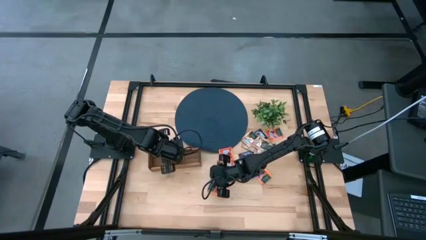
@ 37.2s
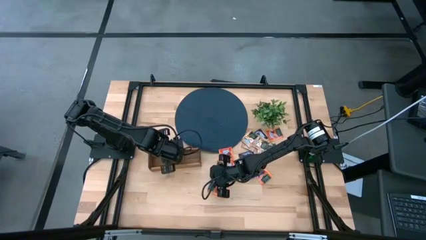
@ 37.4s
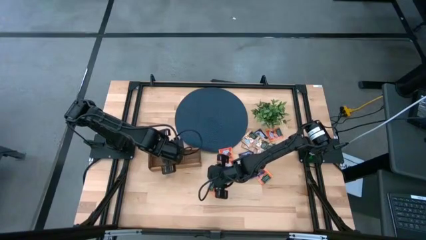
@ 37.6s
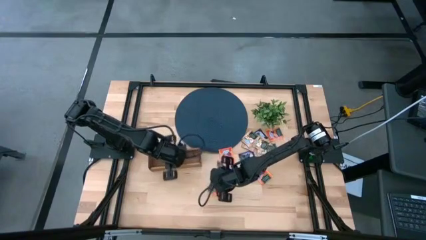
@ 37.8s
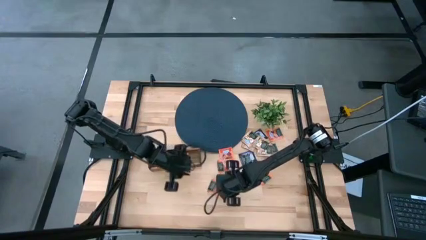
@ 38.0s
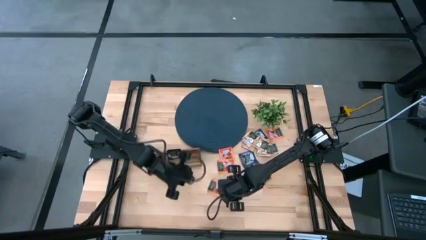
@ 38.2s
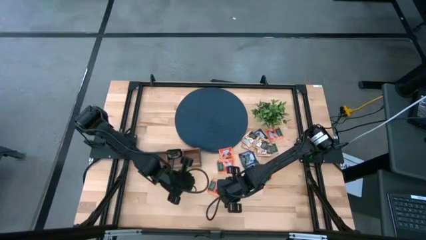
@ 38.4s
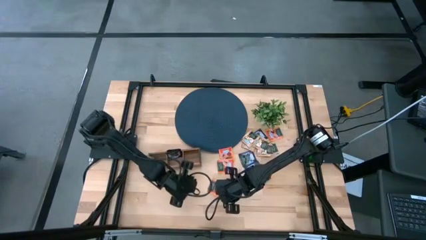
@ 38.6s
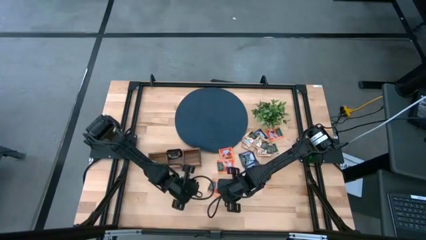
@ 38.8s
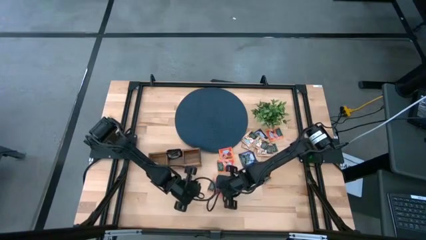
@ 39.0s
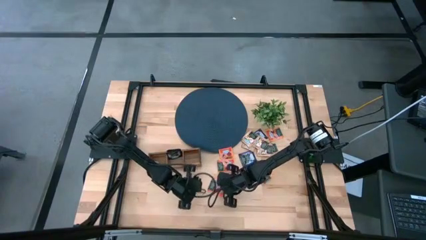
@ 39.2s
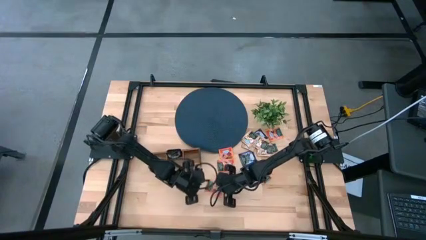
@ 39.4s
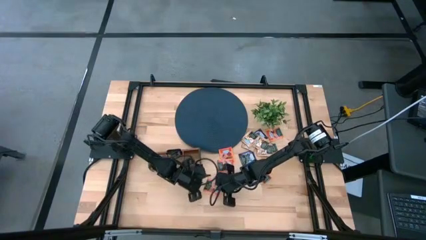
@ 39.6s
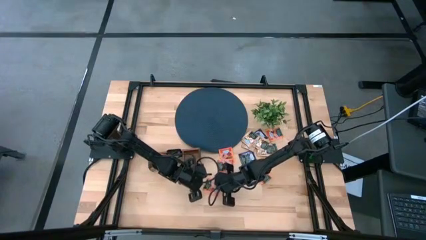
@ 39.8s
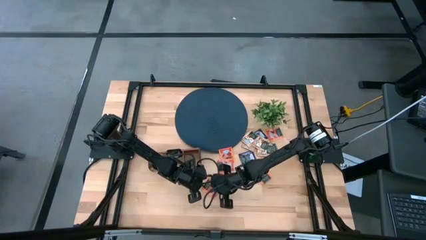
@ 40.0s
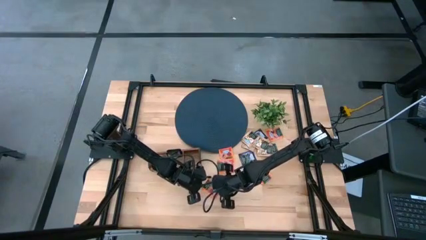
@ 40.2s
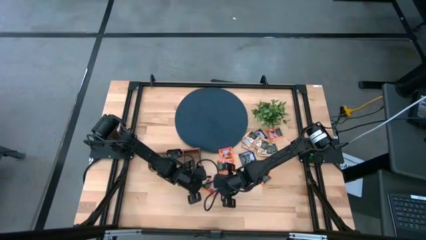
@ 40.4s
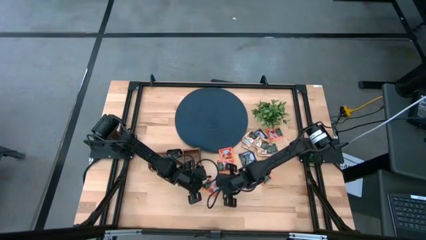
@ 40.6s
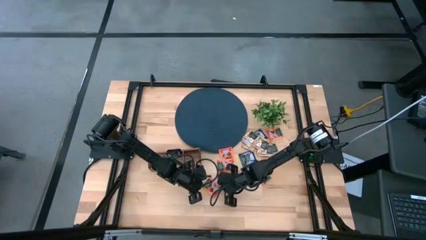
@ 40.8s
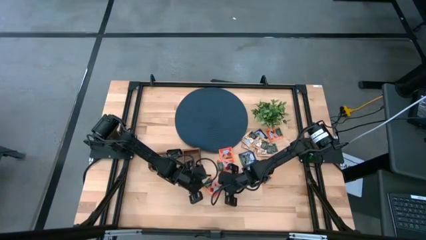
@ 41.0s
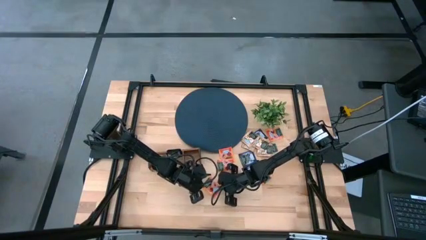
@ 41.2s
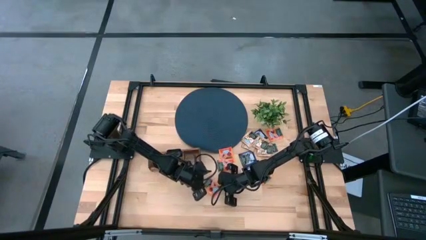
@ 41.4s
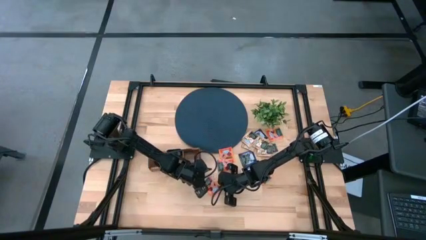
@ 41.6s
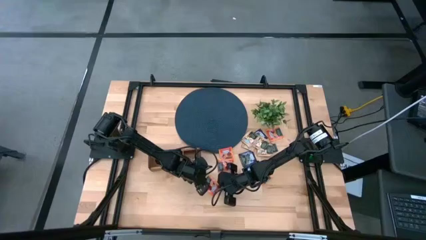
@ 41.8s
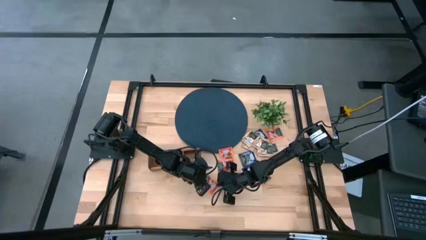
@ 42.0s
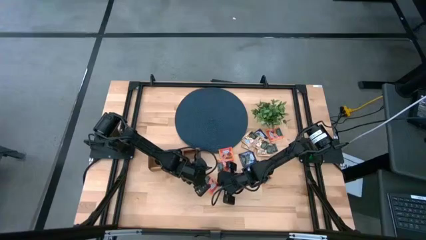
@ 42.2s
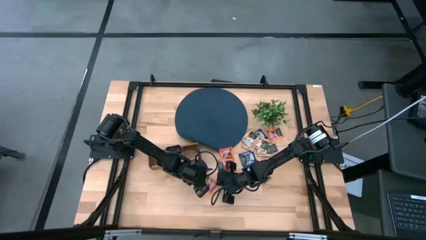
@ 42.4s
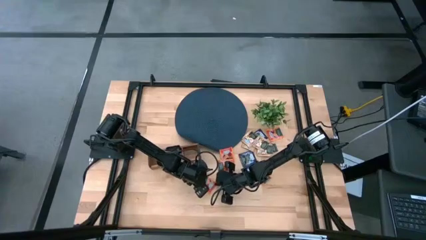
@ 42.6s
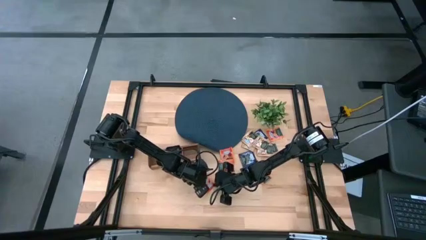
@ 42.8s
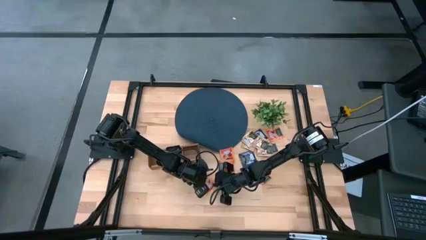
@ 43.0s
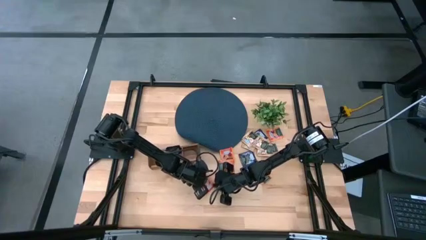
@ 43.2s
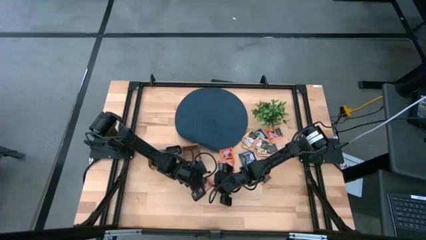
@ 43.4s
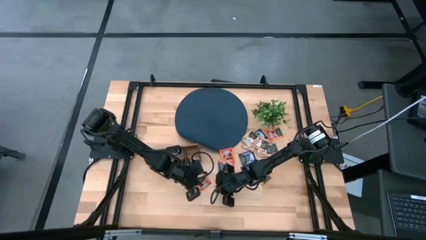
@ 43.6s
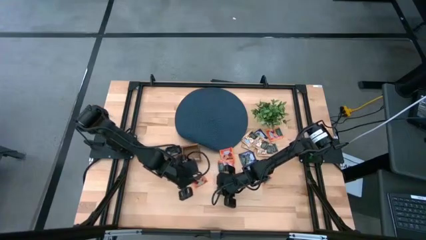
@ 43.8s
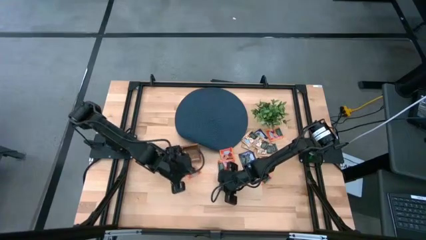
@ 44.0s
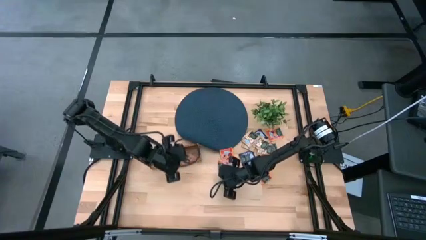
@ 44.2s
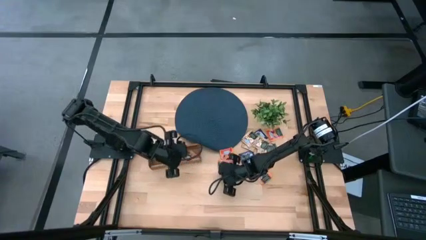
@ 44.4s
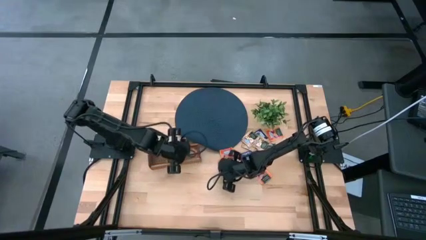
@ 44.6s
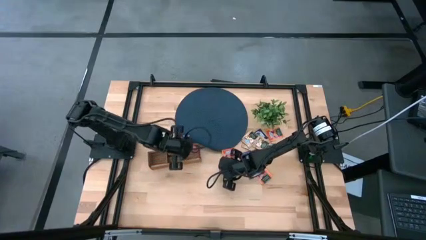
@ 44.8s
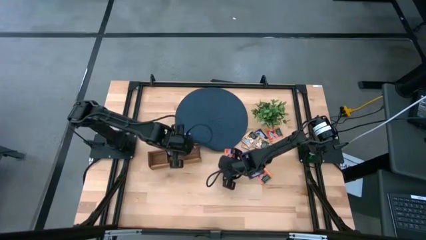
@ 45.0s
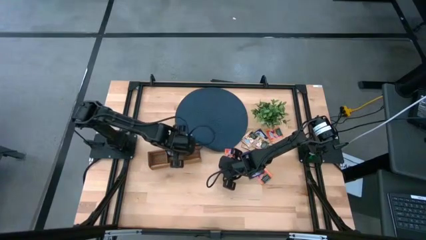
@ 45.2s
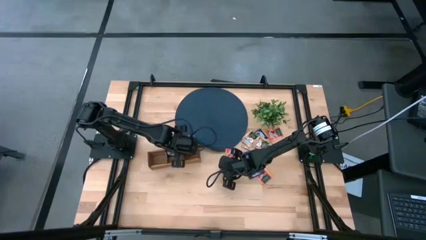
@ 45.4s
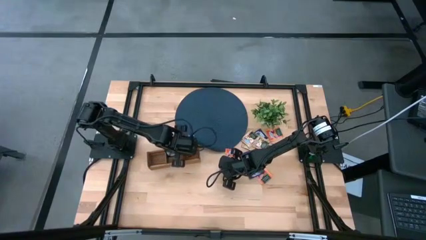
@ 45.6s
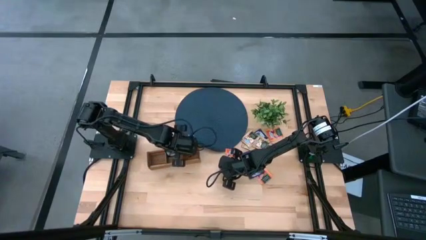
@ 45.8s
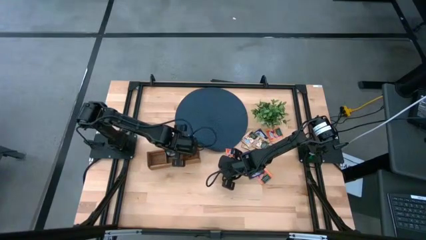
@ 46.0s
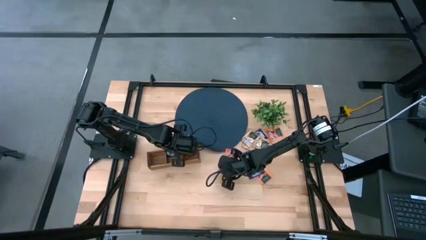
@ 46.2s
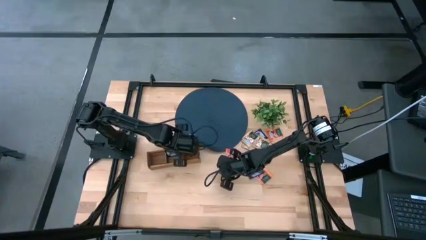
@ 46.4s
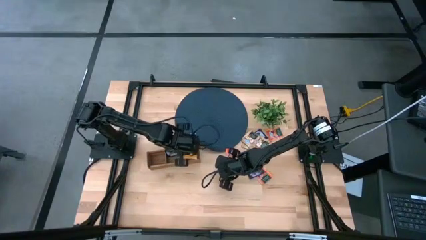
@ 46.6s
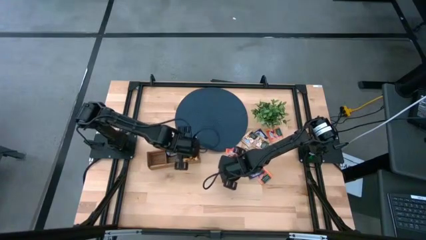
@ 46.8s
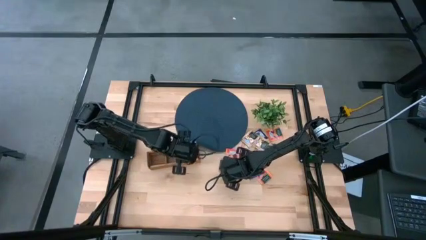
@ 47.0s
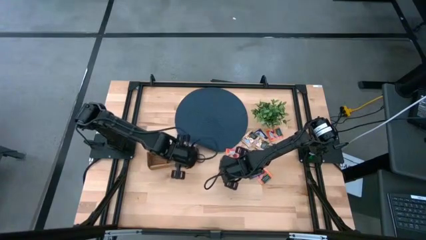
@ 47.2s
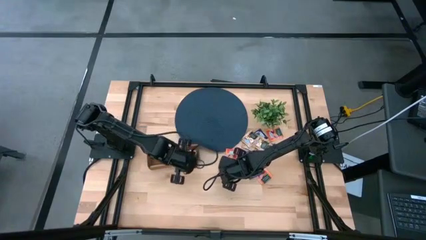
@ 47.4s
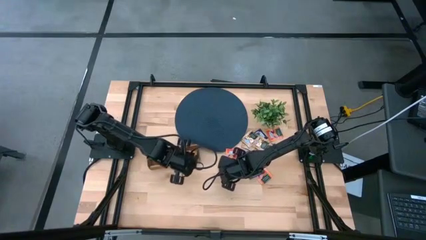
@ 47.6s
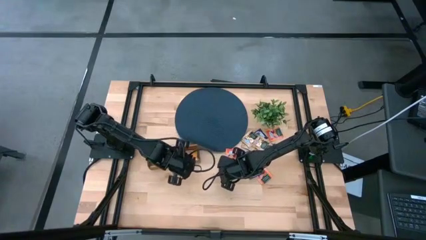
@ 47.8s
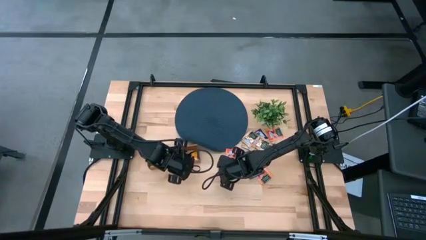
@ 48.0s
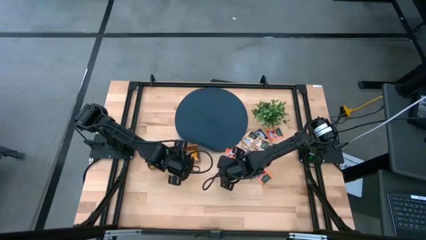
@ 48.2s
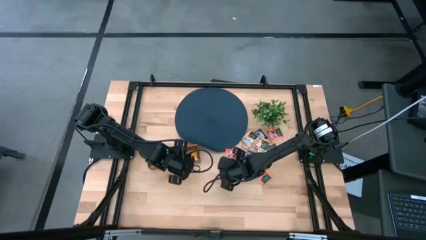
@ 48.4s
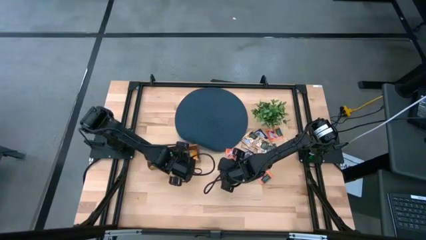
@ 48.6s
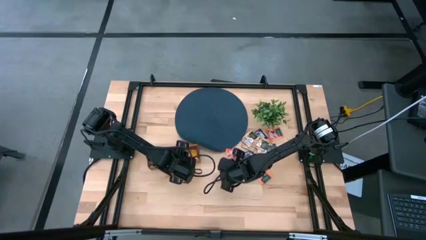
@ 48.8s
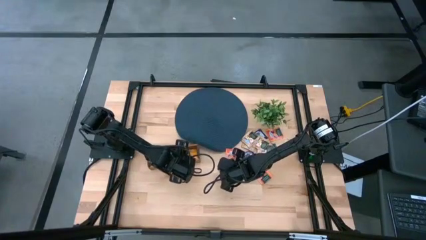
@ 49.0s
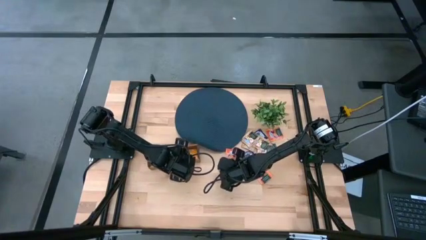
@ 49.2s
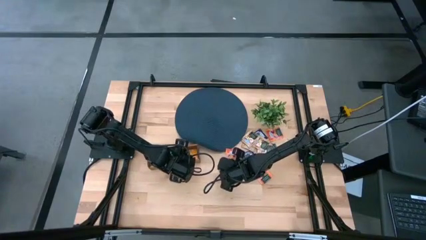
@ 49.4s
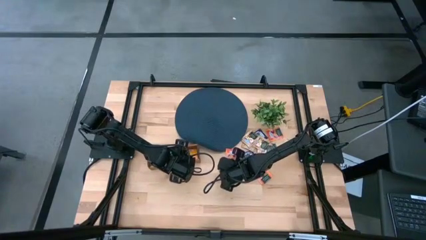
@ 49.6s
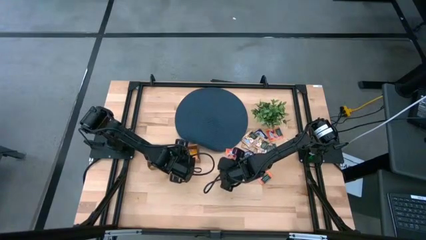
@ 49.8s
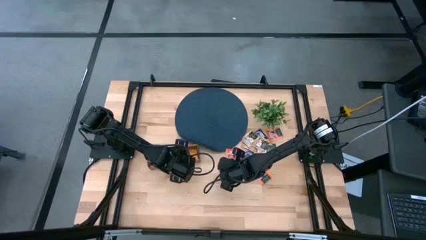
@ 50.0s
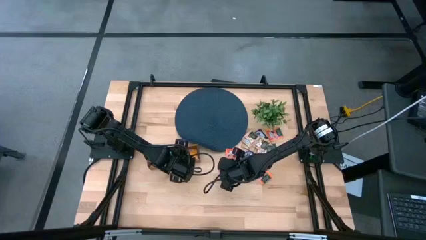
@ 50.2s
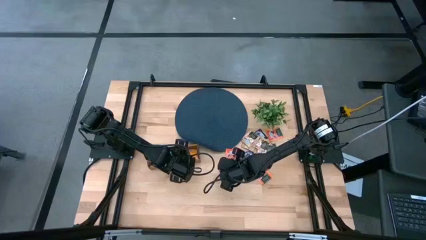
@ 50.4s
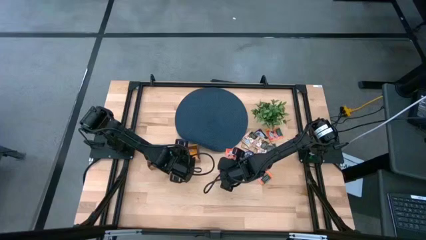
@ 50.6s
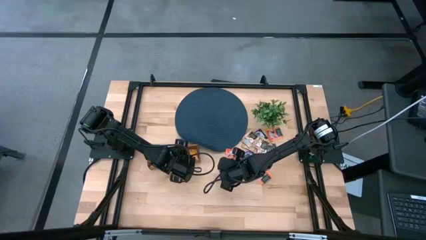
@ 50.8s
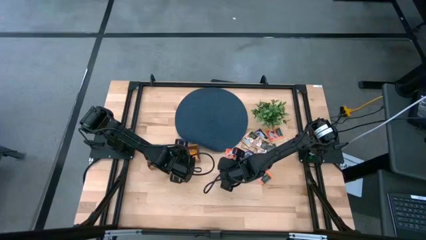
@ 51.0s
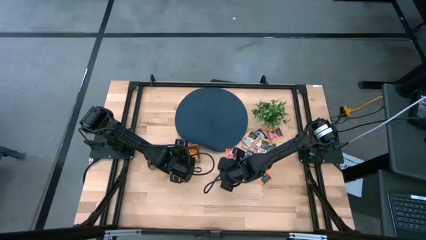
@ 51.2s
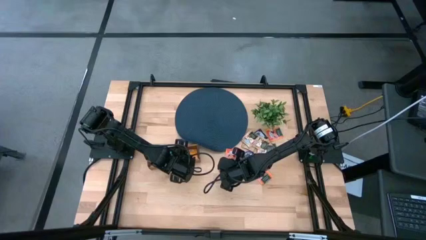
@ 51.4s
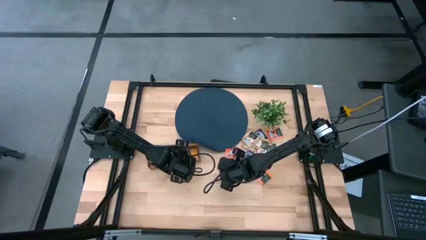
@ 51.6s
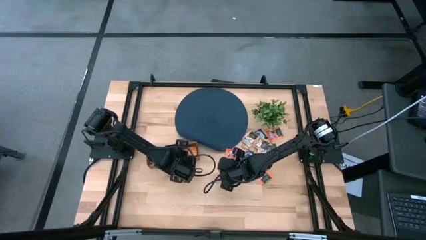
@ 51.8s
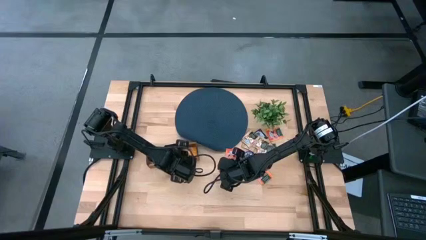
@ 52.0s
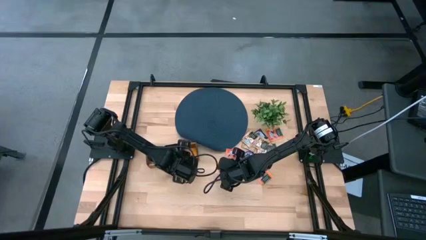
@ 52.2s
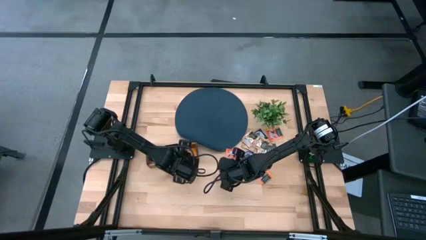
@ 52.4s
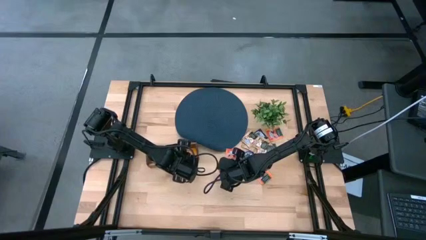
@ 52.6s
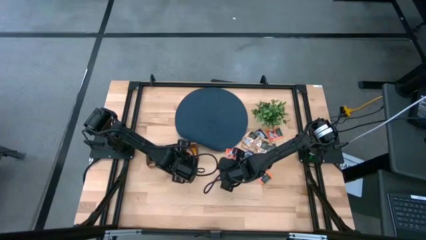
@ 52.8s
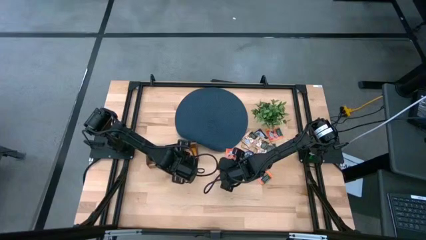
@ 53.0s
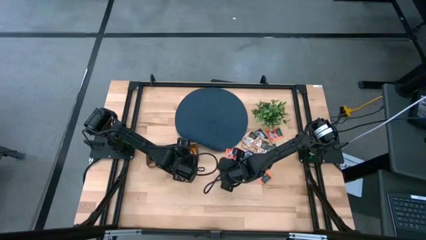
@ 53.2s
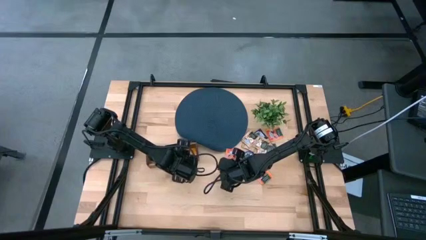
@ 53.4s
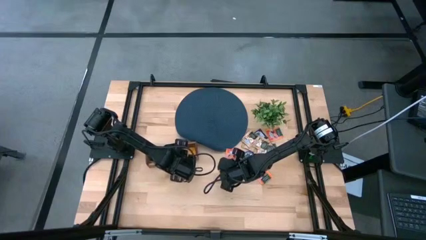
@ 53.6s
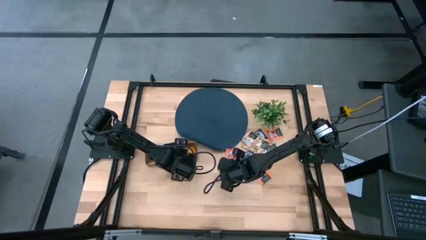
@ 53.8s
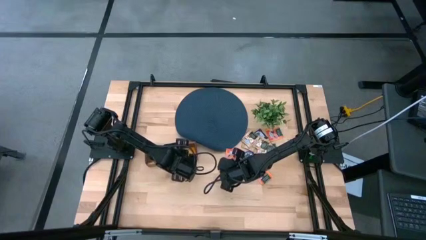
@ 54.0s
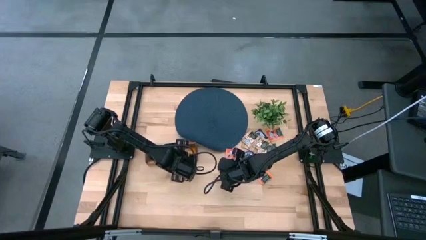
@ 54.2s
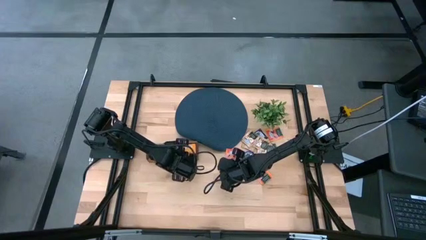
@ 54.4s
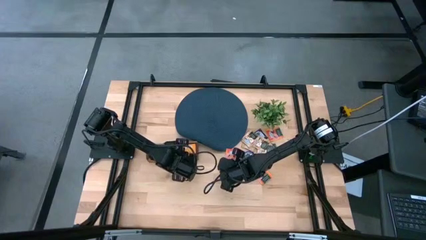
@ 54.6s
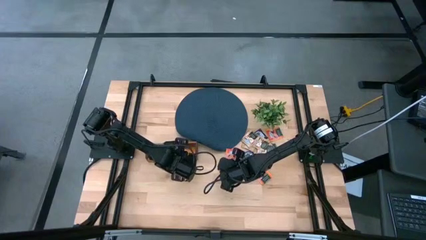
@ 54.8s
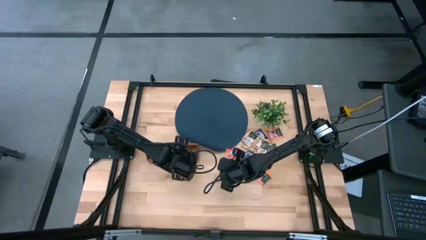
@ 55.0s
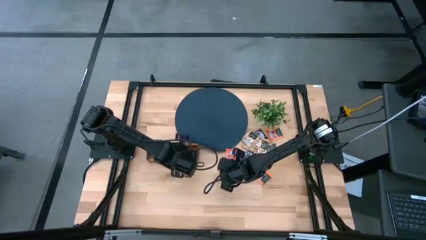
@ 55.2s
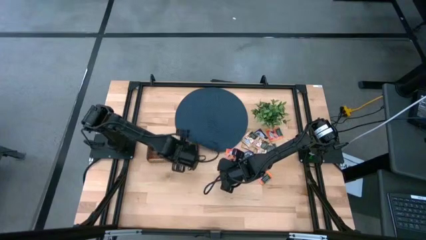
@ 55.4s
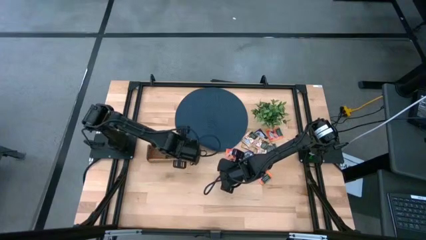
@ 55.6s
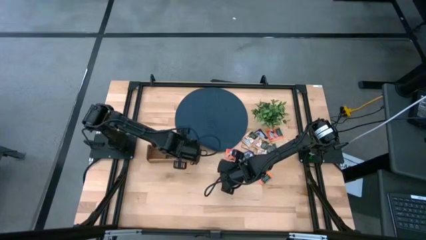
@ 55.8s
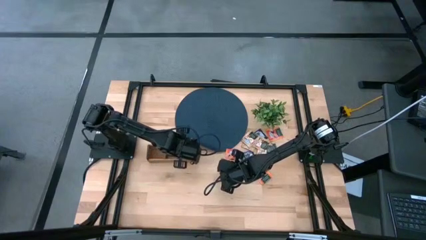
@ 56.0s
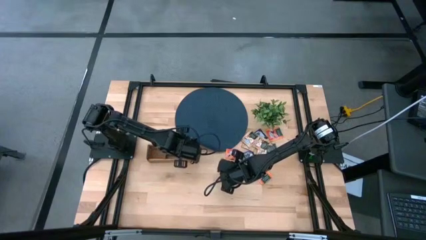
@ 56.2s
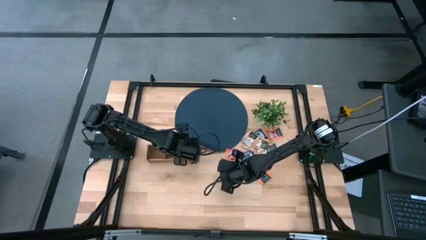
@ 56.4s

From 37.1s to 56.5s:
Task: Pick & Place Tea
Put the orange tea bag into the right section of the wooden organizer
